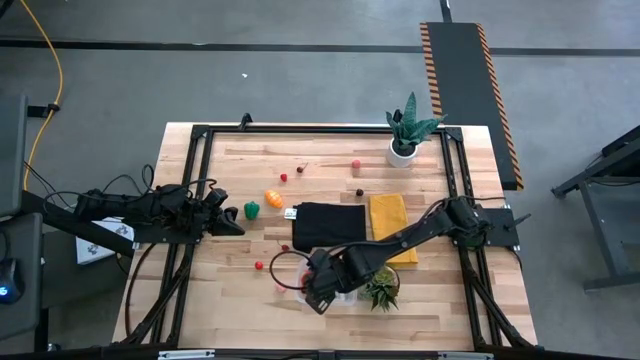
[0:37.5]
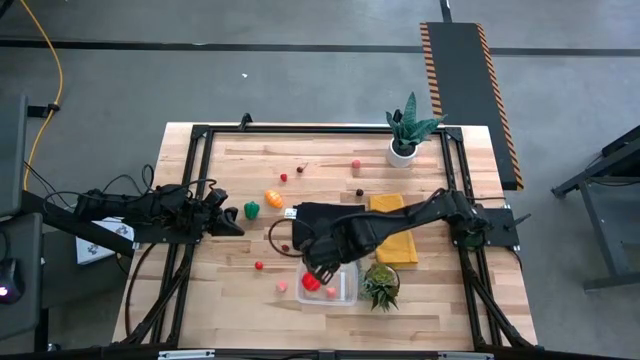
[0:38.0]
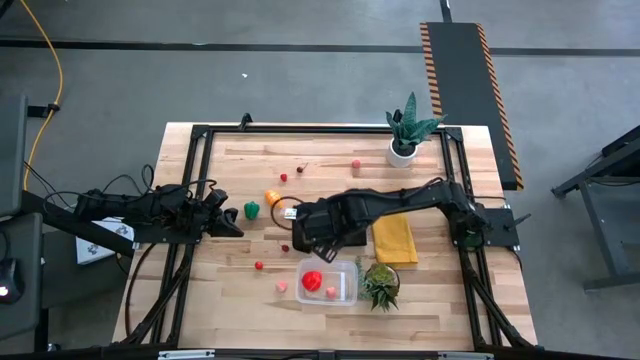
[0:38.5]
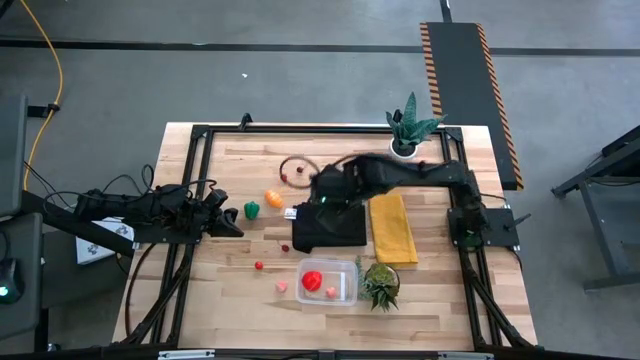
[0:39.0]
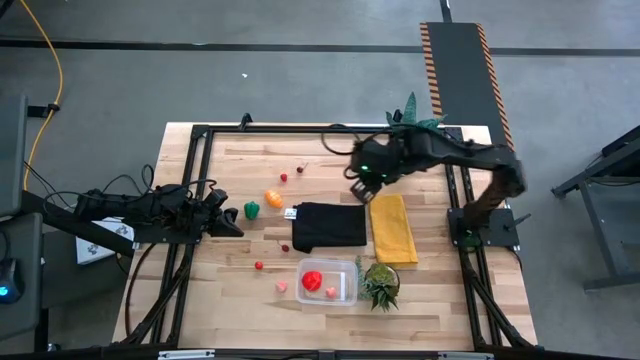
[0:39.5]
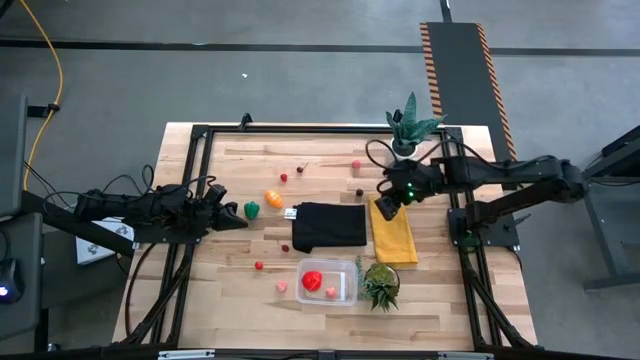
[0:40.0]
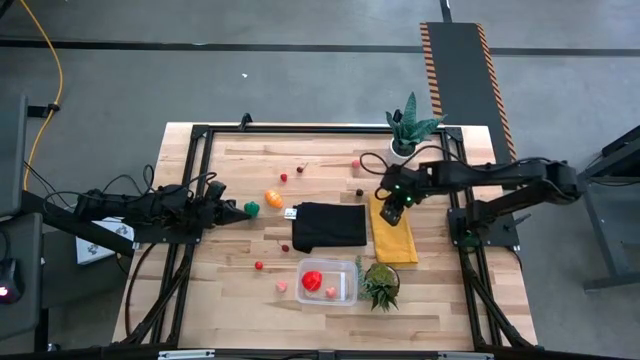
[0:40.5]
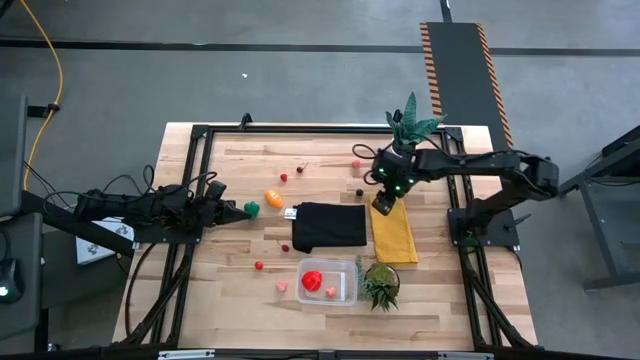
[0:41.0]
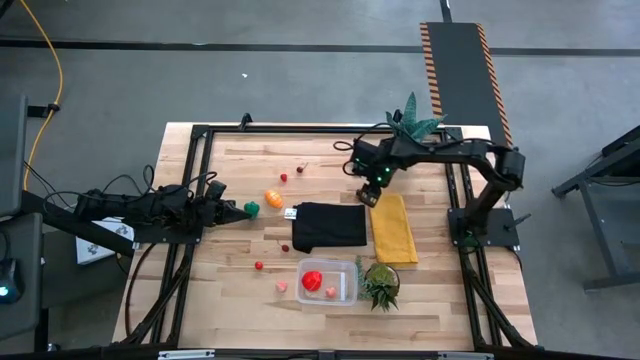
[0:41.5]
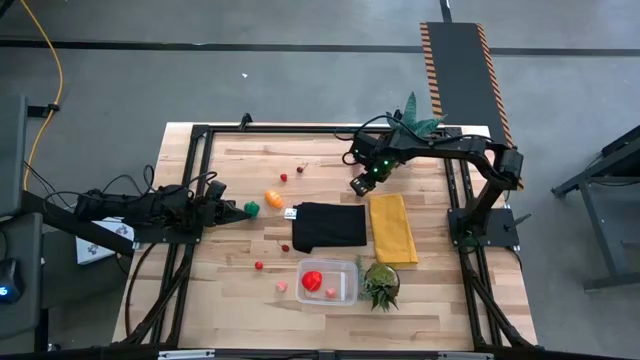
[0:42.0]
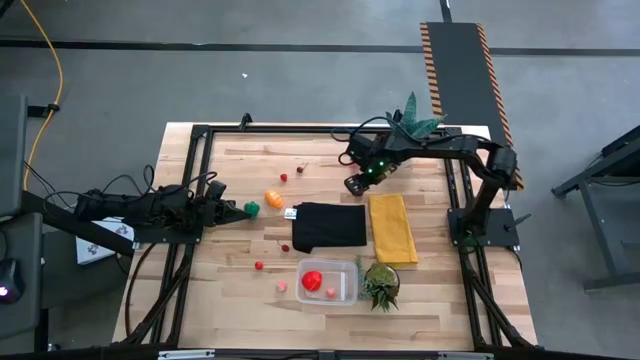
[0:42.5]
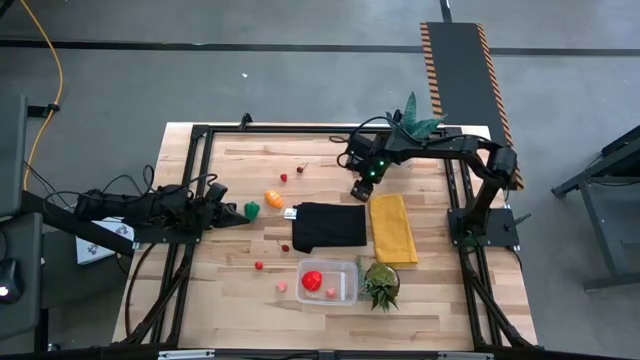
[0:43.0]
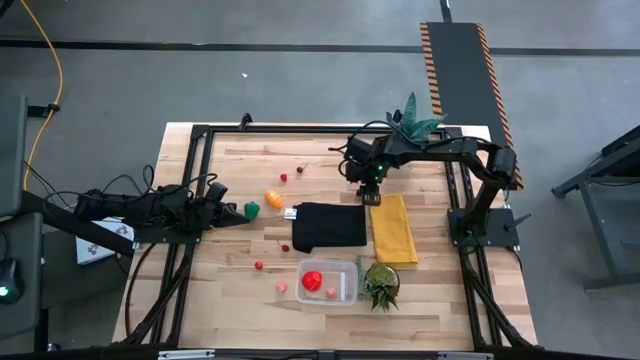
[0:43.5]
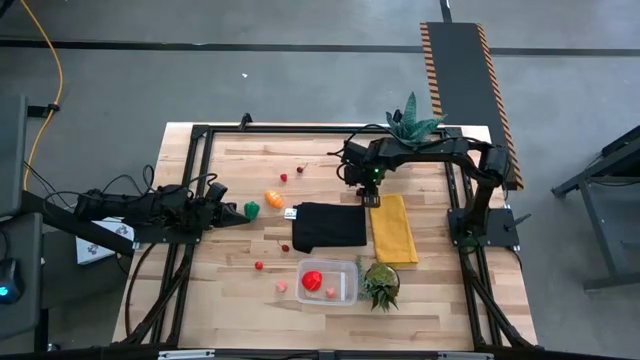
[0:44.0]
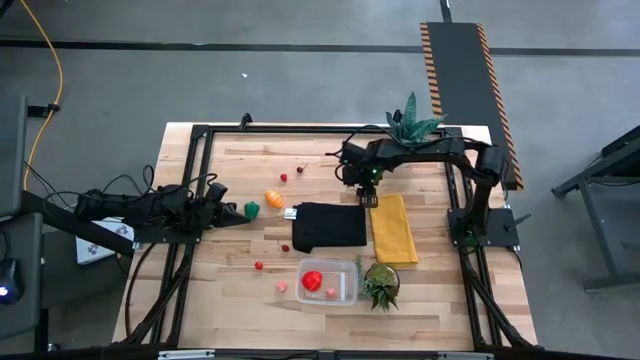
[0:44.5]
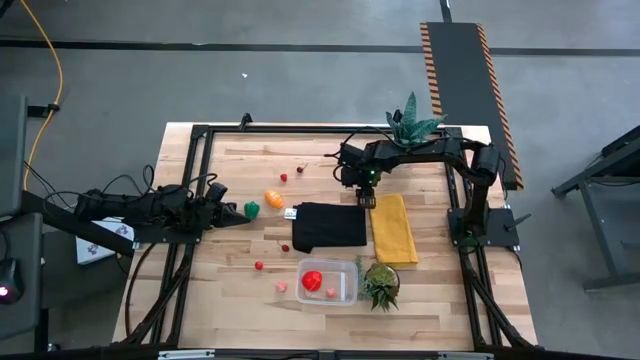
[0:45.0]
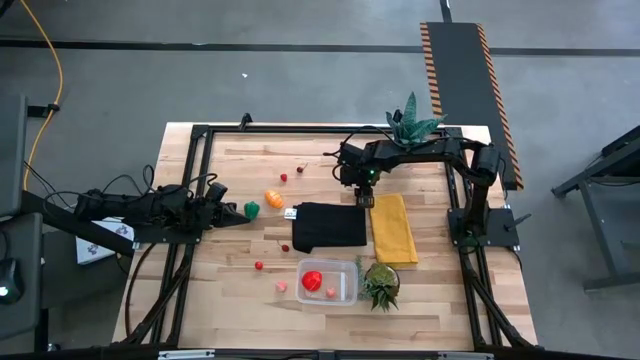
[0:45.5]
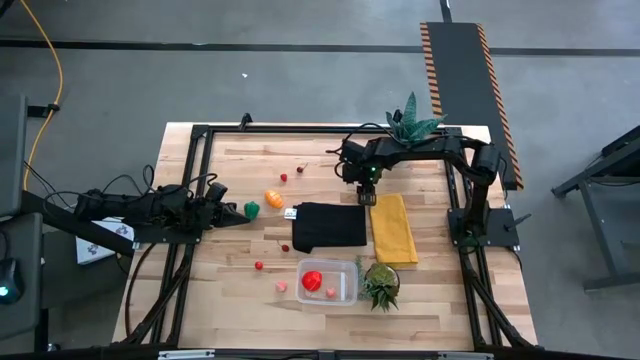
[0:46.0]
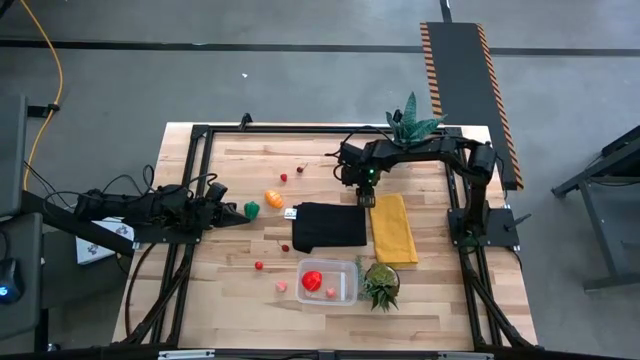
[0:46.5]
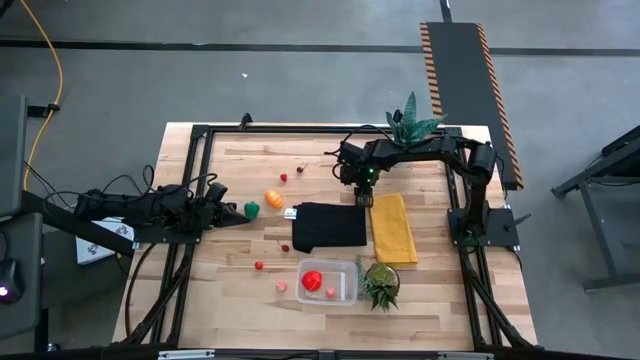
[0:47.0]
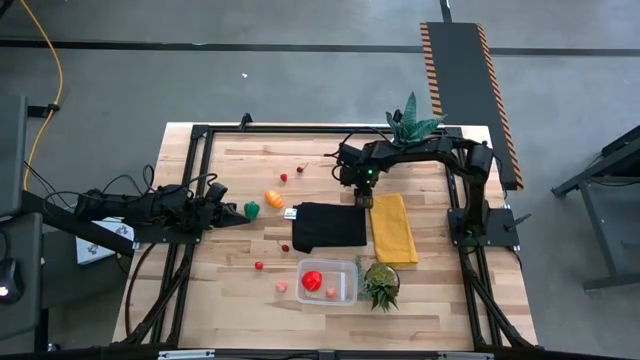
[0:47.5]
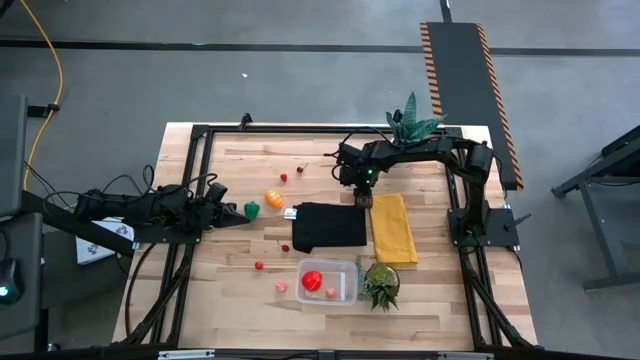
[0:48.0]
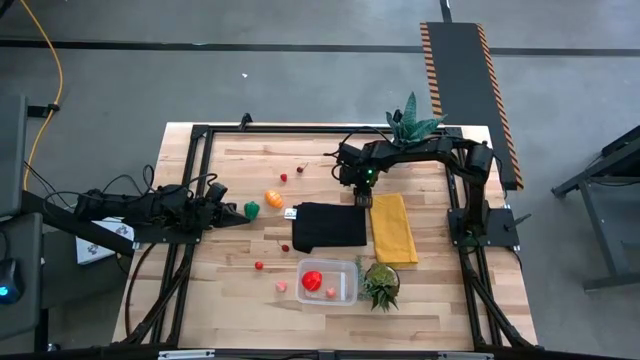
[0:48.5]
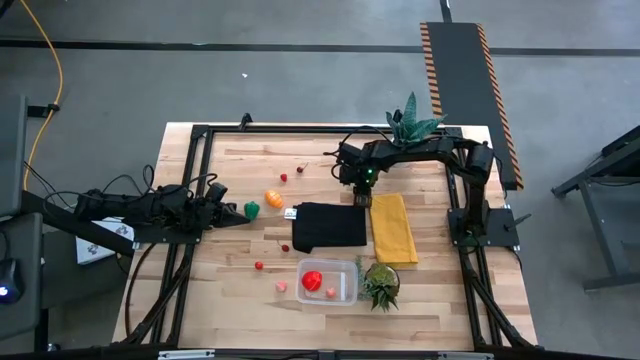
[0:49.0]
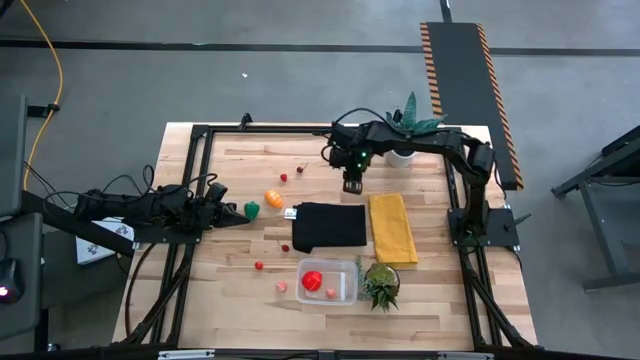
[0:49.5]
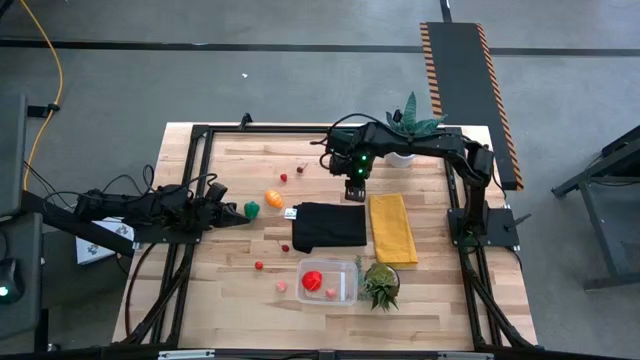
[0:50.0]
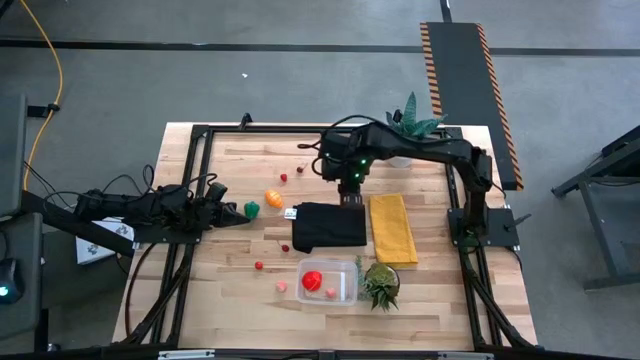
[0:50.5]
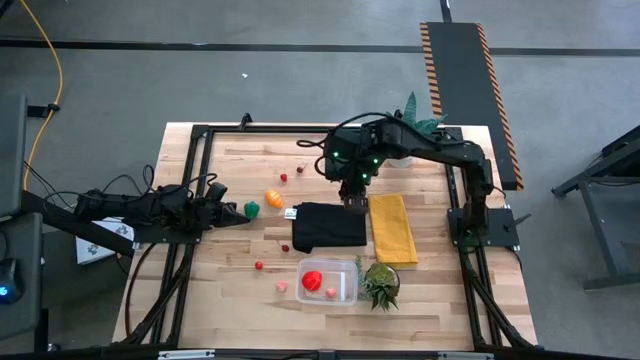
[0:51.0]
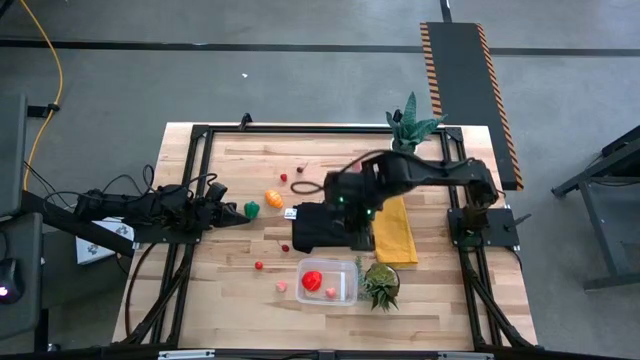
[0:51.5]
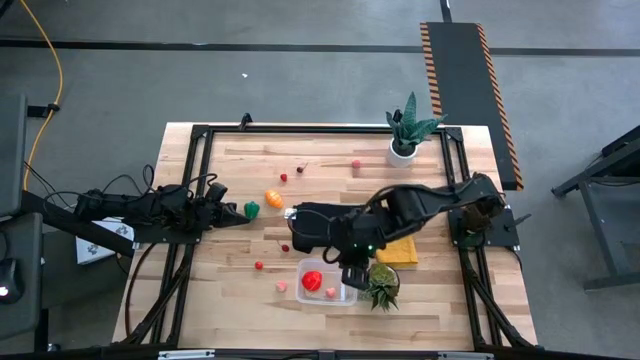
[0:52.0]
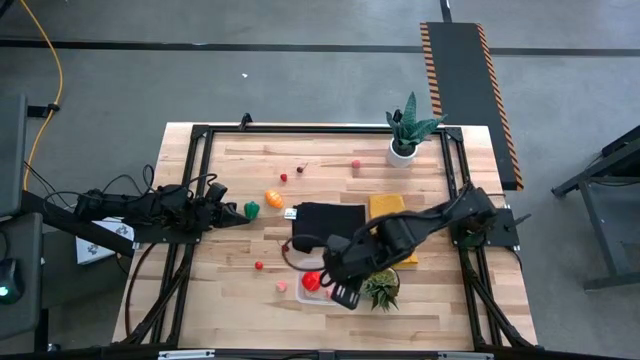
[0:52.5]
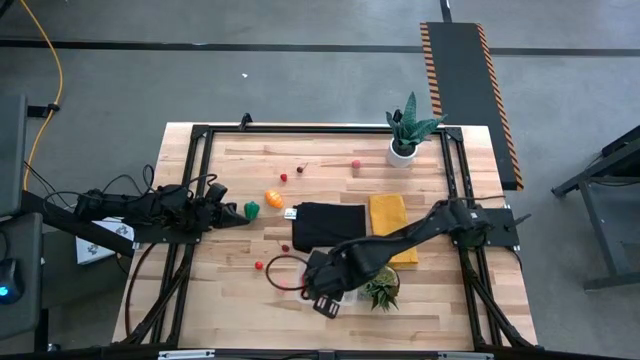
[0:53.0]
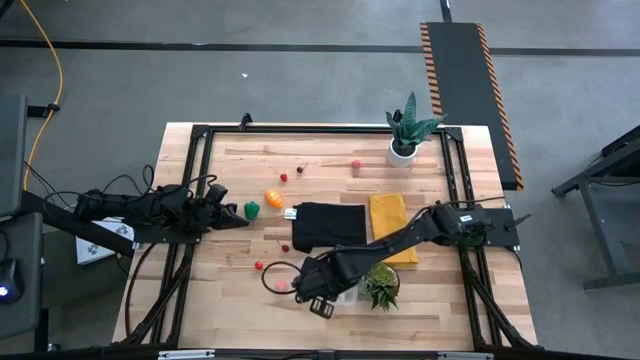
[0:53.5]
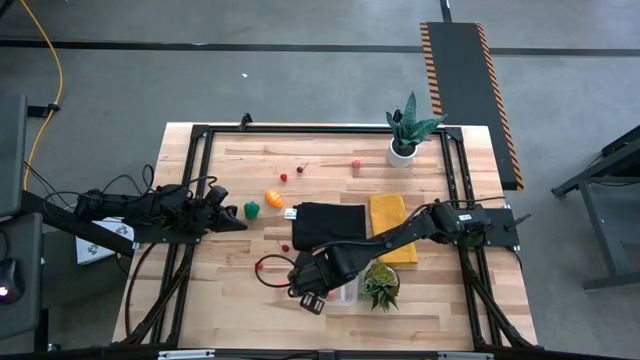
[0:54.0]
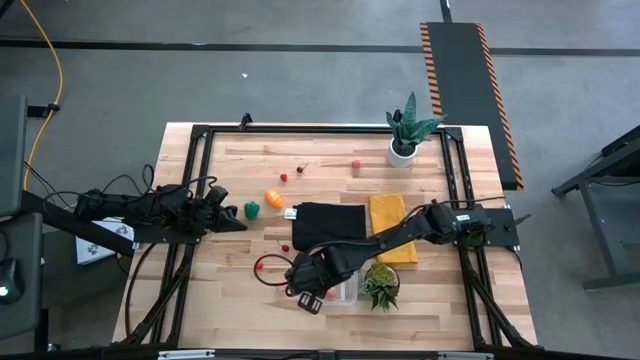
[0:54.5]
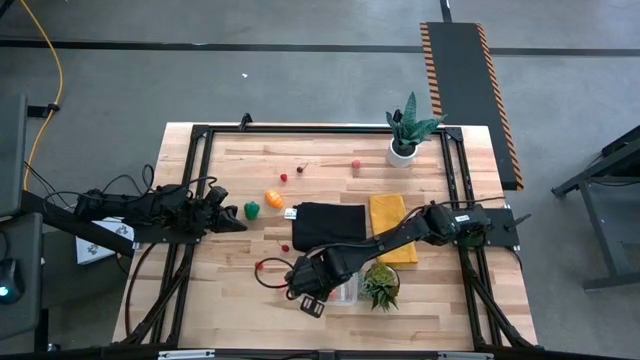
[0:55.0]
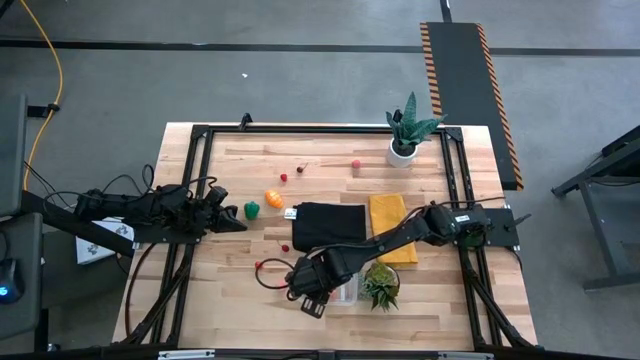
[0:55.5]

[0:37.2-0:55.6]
Task: Pick and placing Produce into tupperware
Put the black cherry into the transparent bin

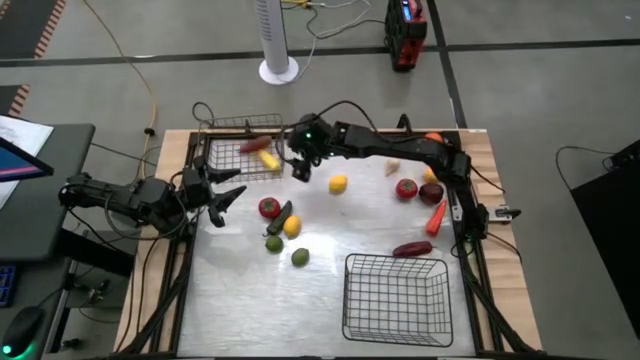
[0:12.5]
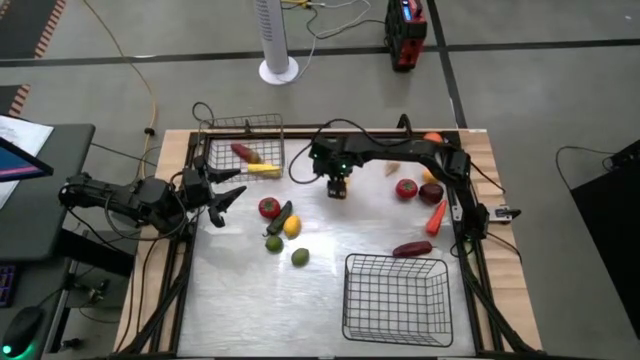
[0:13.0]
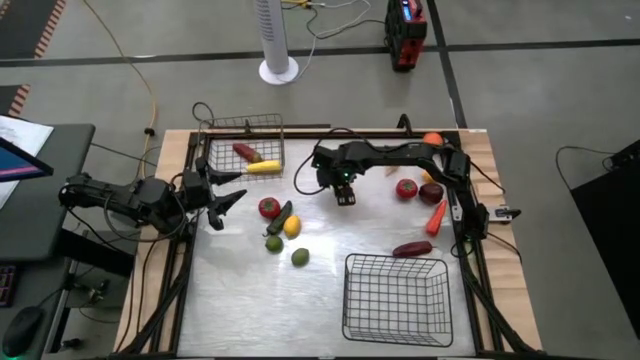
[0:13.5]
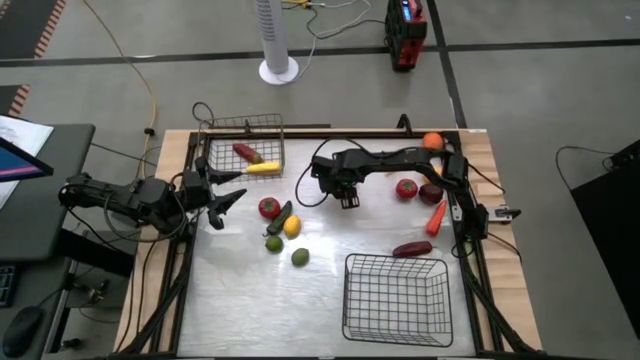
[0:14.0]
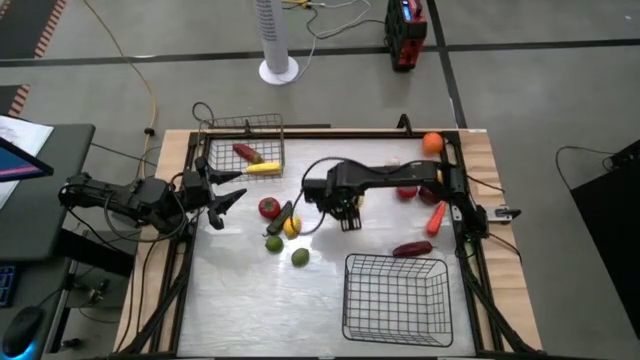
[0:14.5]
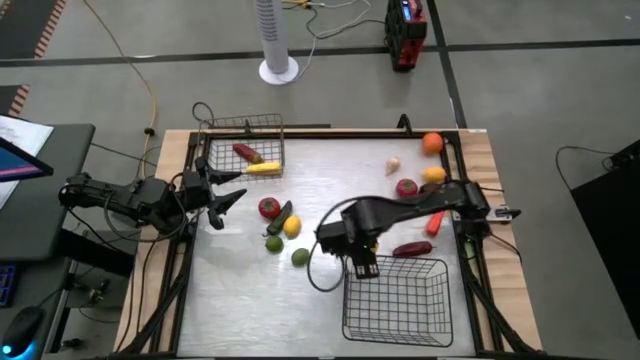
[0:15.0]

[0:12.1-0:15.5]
Task: Sort produce into baskets
Put the top left lemon into the bottom wire basket

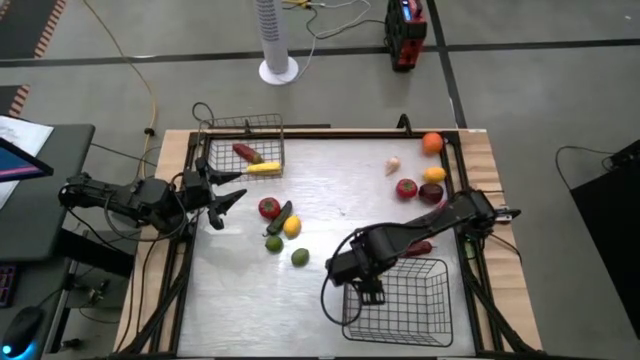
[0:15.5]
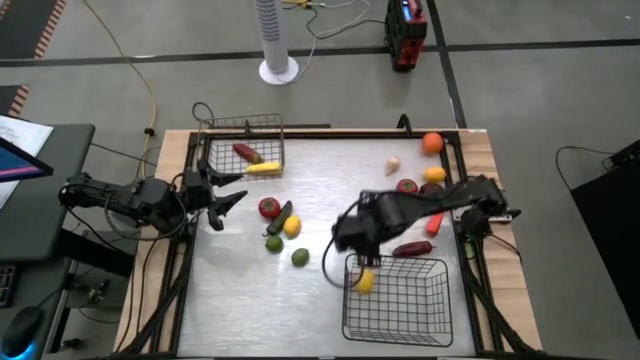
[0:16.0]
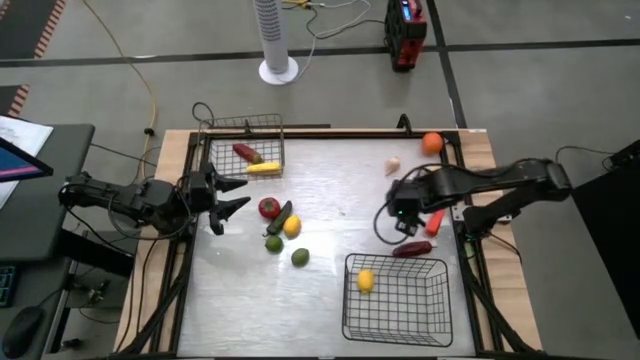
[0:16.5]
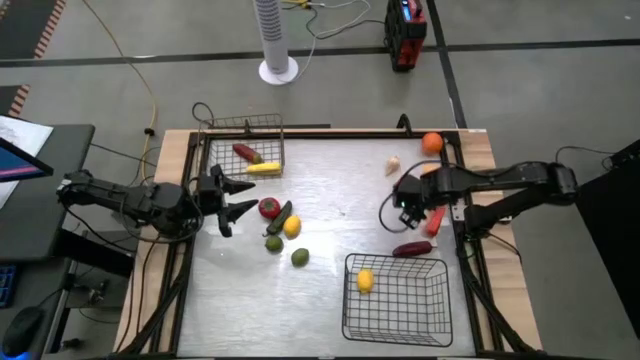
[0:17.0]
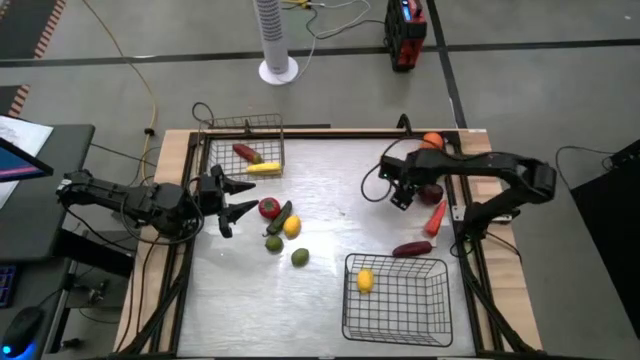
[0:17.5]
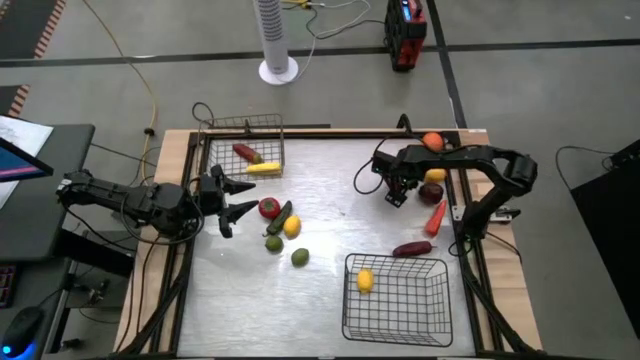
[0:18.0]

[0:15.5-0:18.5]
Put the right tomato into the bottom wire basket
